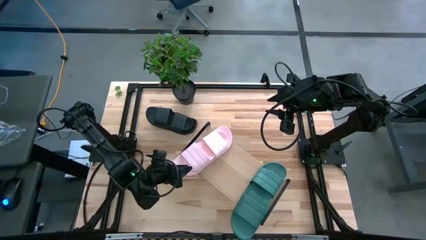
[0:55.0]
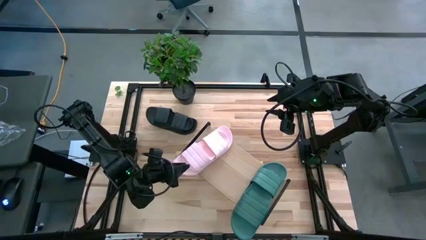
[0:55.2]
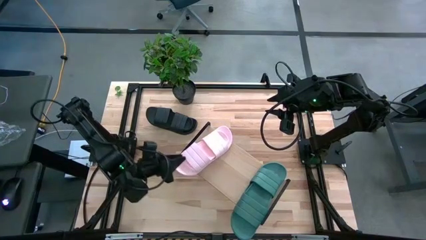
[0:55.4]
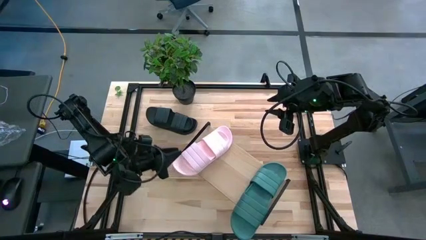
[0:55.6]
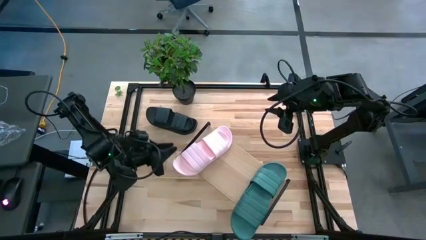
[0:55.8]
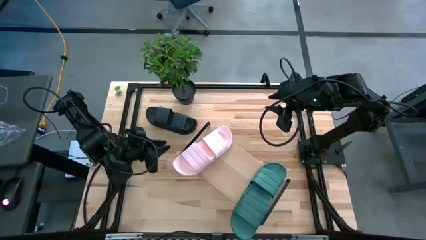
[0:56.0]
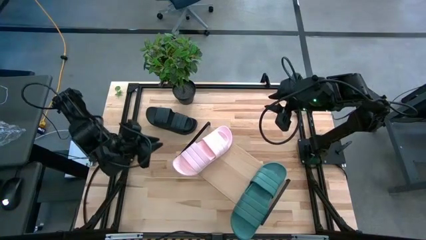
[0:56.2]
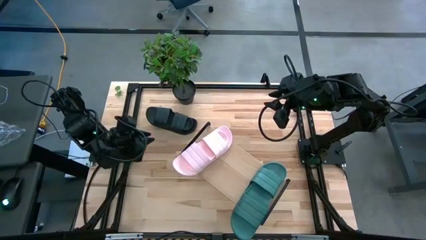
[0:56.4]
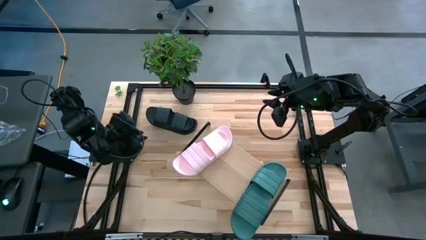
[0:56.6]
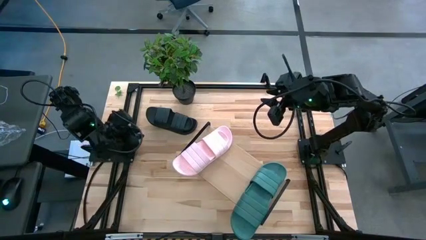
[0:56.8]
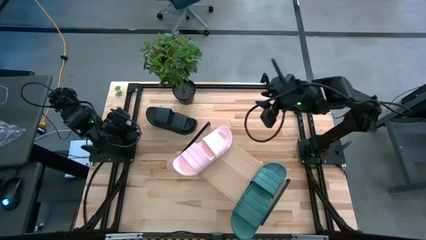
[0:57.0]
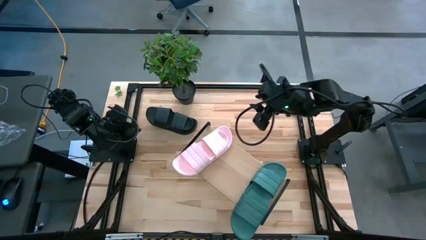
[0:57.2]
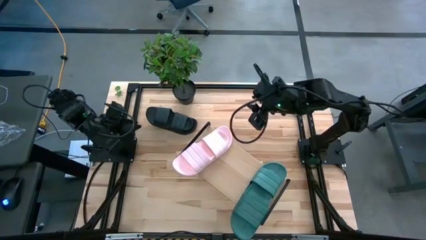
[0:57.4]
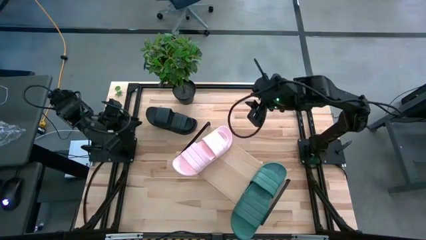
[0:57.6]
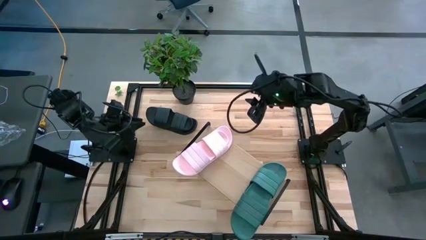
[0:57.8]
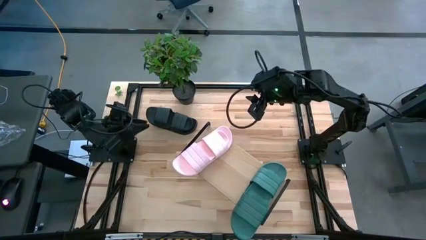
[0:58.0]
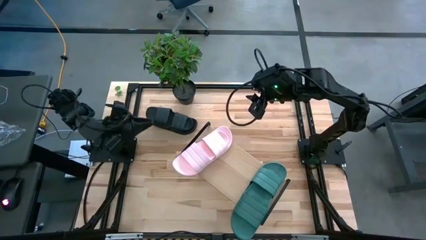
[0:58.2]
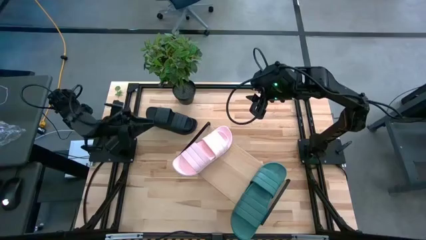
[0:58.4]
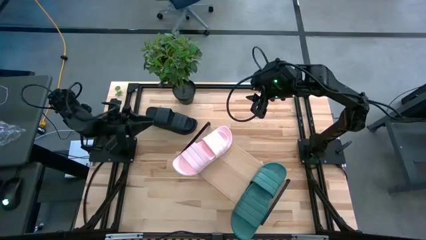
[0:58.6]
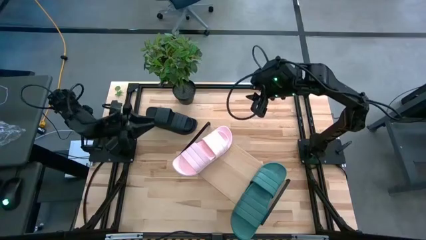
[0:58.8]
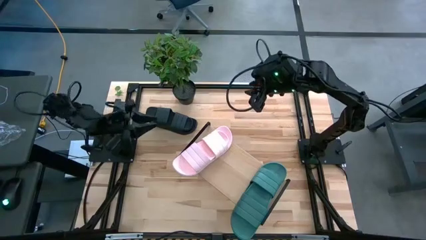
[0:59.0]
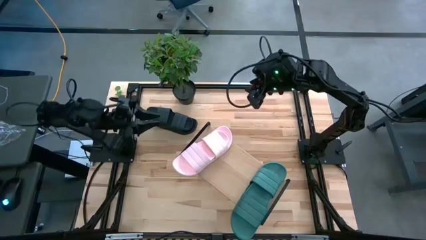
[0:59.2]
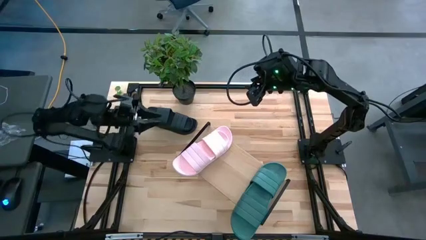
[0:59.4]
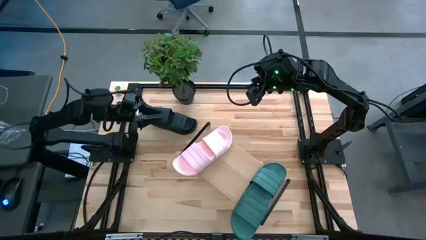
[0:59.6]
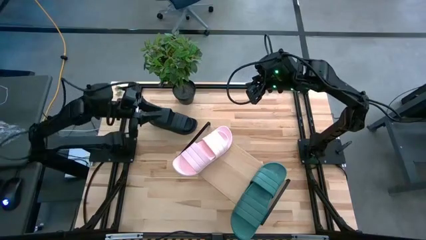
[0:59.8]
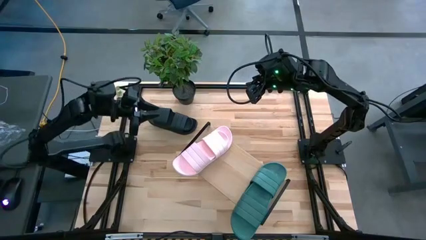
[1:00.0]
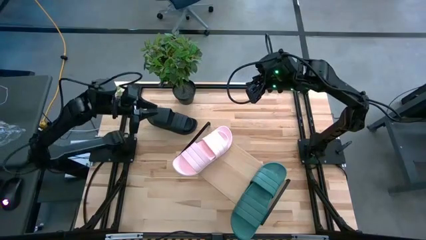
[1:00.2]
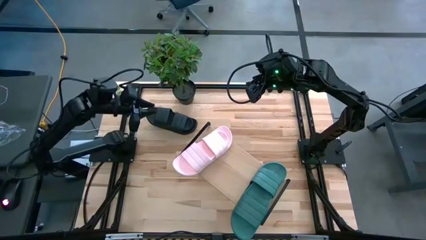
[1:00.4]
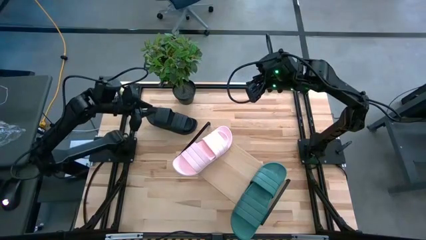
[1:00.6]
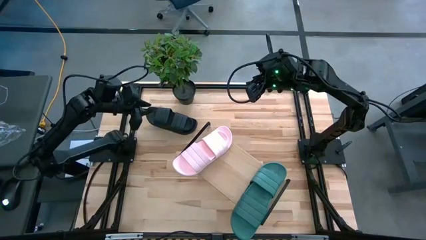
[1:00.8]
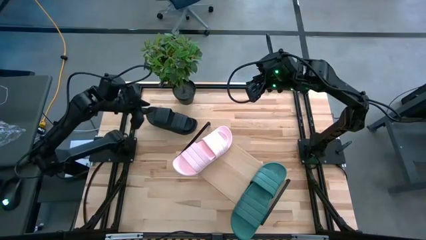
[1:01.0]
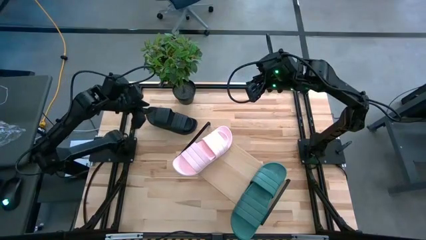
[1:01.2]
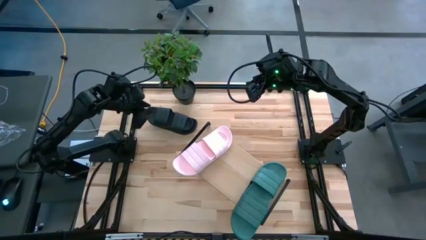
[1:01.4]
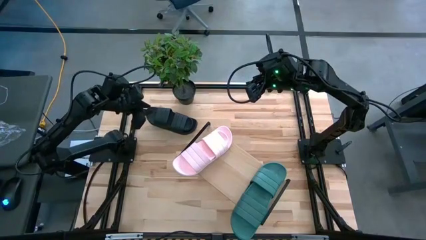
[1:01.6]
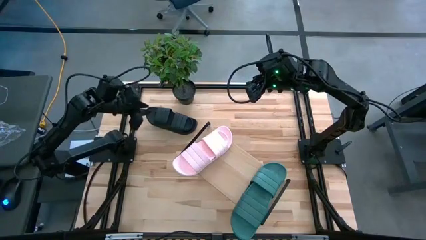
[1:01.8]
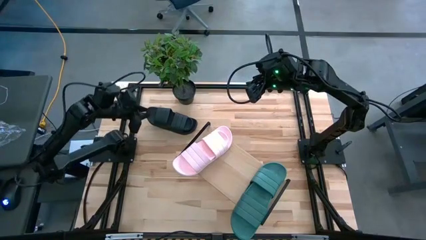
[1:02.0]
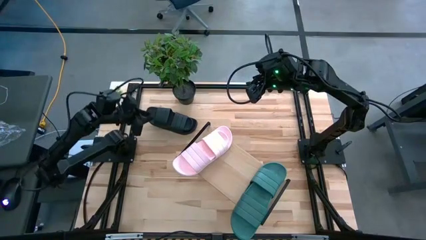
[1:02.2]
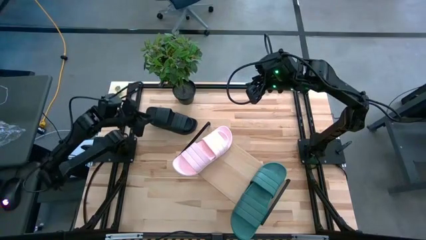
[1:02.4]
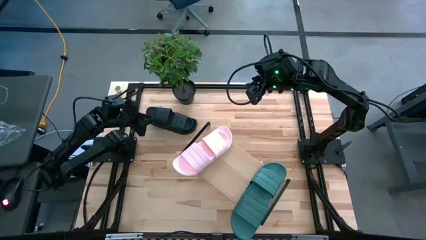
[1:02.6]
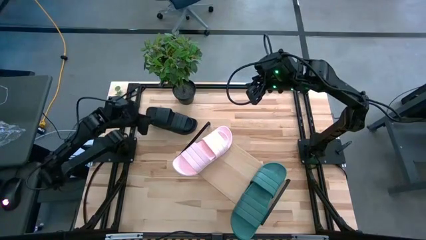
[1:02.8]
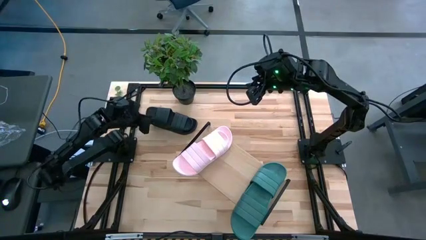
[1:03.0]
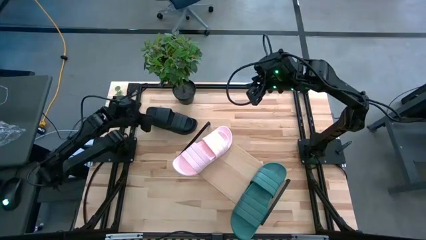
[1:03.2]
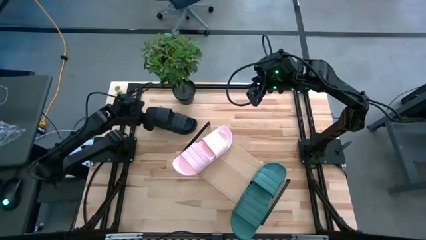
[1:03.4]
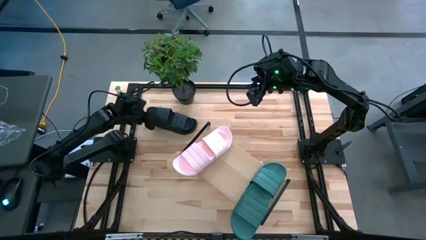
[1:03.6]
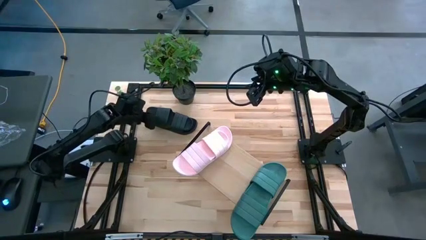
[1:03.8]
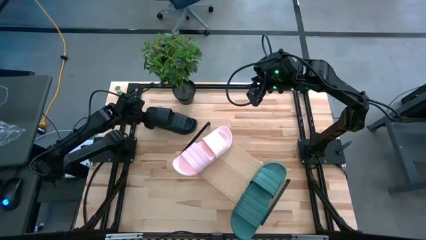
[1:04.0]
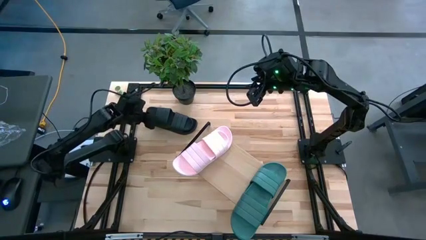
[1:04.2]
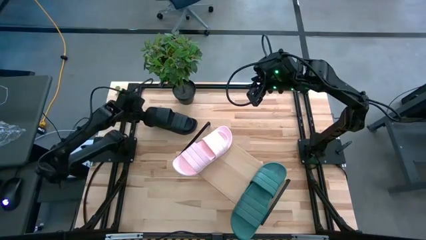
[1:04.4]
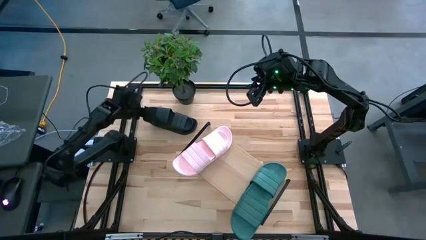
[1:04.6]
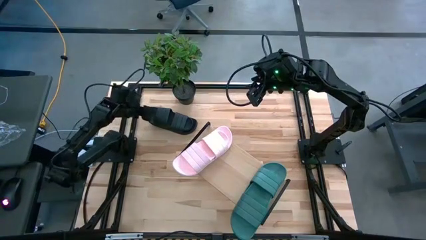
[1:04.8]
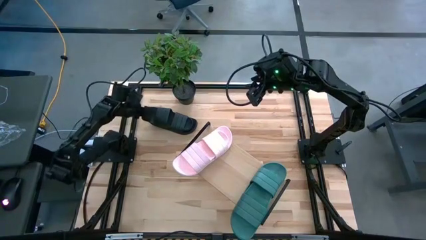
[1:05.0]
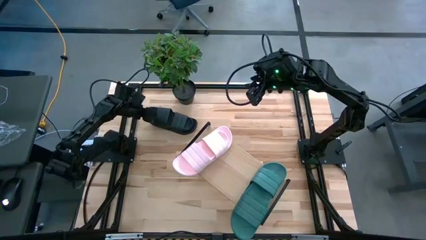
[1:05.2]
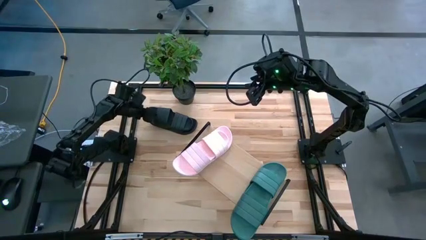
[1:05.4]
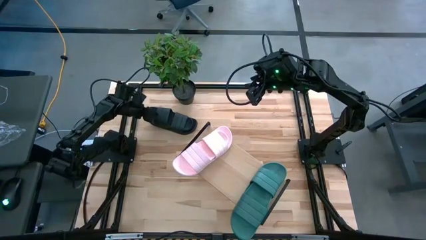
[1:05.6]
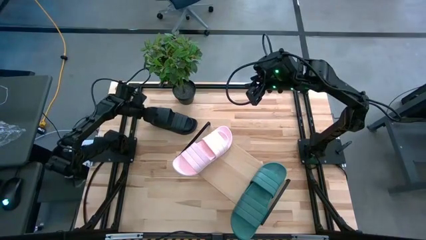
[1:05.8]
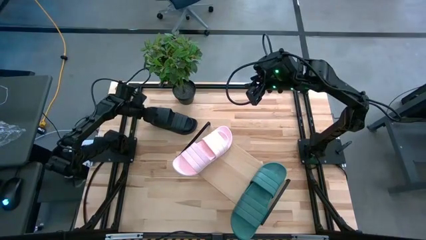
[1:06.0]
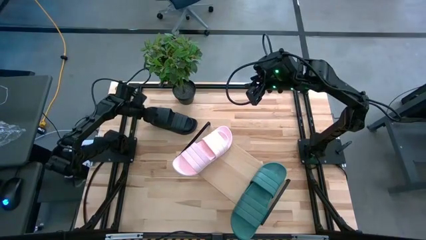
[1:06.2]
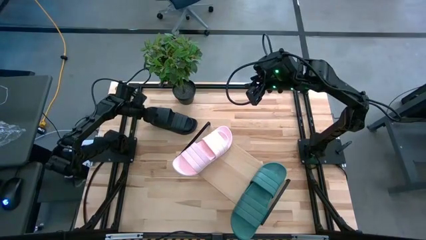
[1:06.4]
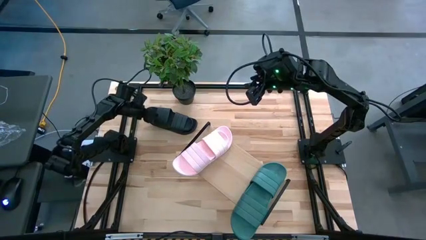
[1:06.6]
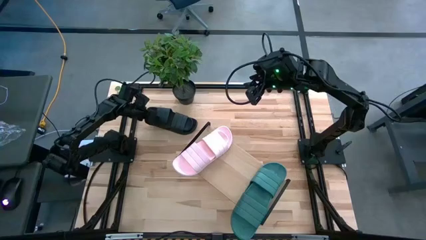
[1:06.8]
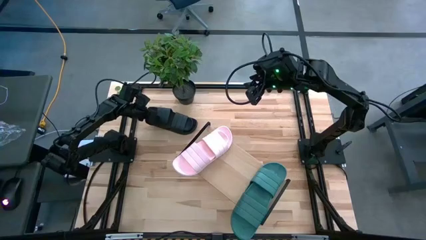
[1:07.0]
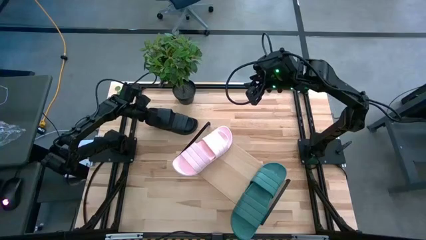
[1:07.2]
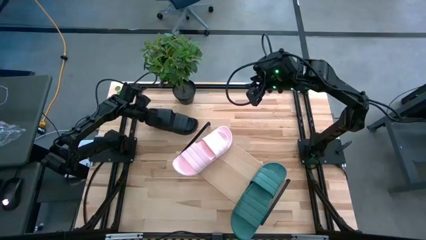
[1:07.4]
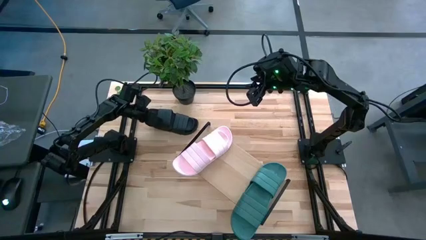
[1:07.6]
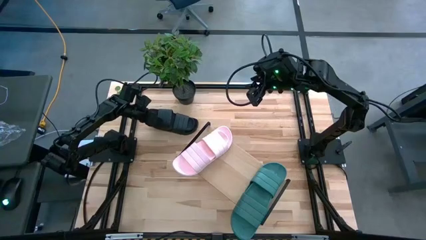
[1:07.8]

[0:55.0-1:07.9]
Task: Pick and place slides into the shelf
Put the black pair of slides on the shelf

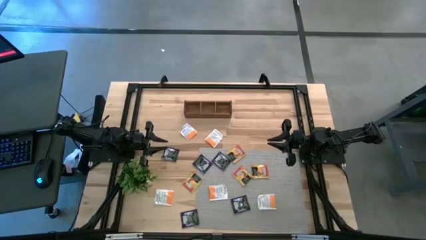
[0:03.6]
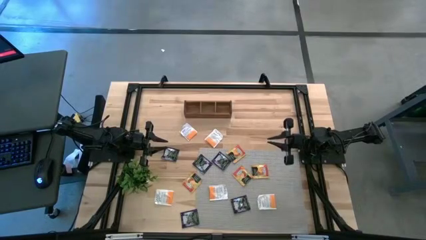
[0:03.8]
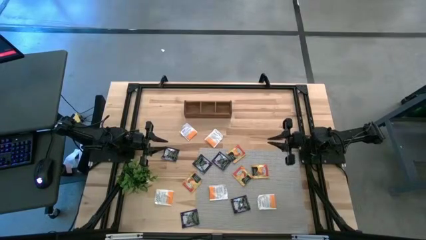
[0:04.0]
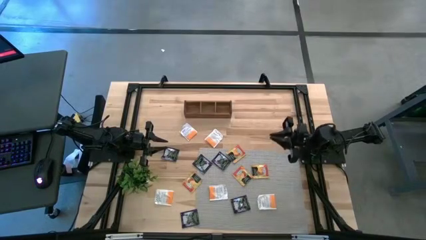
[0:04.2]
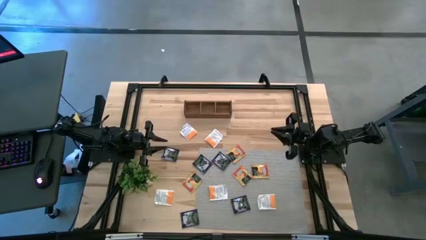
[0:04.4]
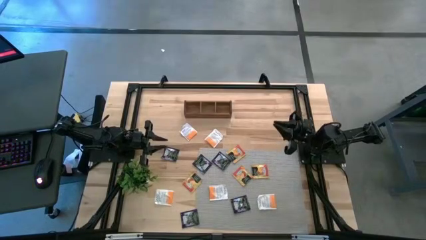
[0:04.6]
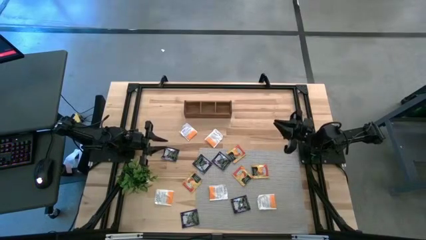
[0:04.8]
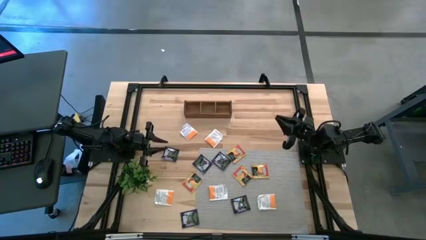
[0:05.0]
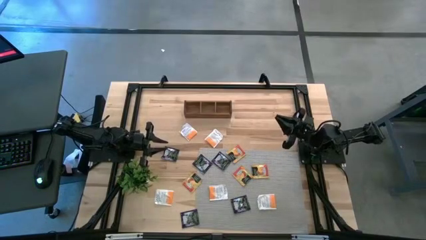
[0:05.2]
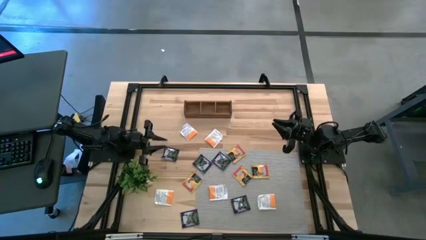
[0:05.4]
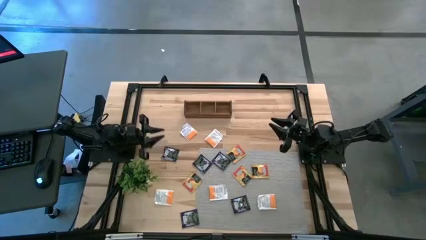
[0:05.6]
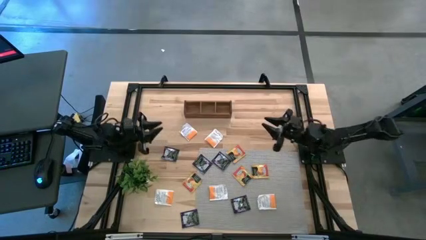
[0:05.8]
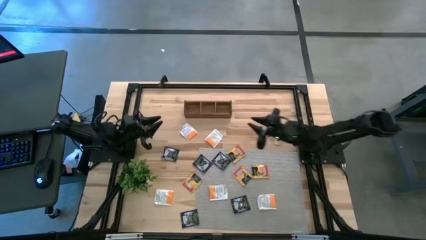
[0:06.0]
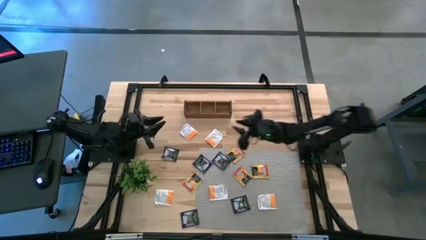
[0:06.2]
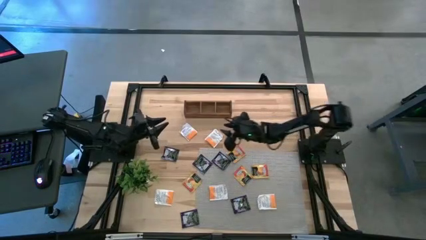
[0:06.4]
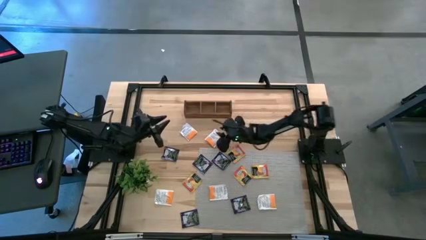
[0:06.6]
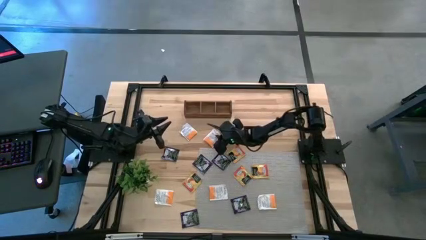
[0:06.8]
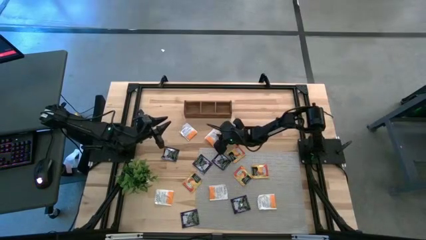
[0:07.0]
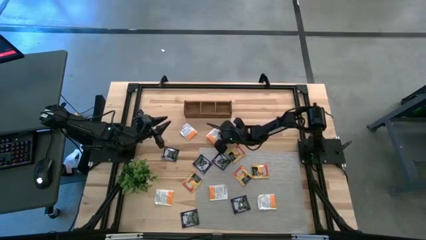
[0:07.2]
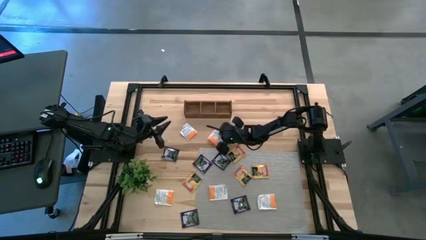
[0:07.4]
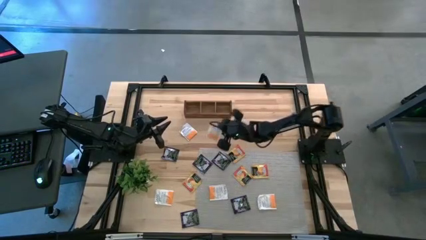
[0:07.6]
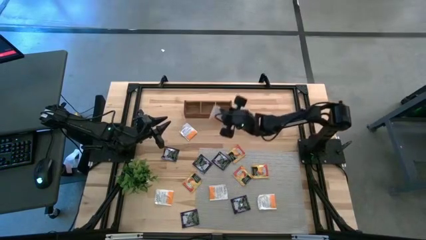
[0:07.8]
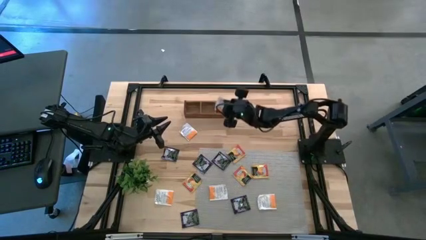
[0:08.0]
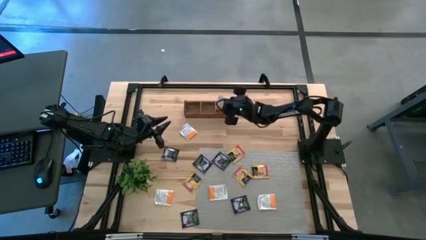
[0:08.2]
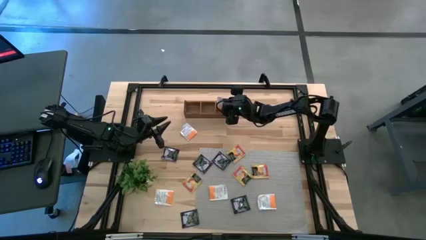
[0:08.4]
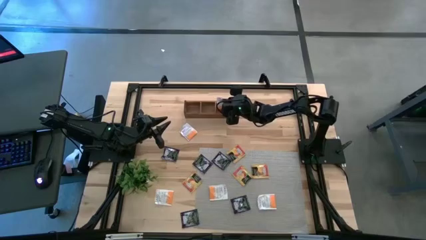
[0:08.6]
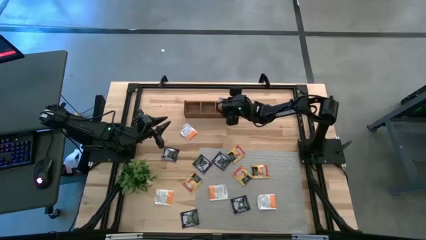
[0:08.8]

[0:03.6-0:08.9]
Task: Pick & Place Tea
Put the white tea bag into the right section of the wooden organizer
